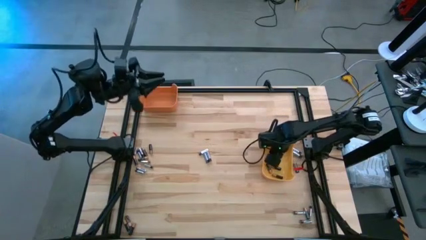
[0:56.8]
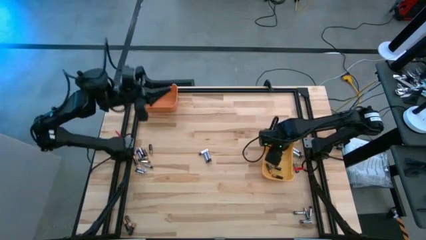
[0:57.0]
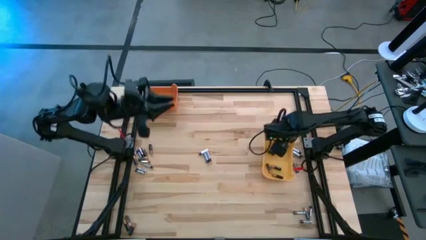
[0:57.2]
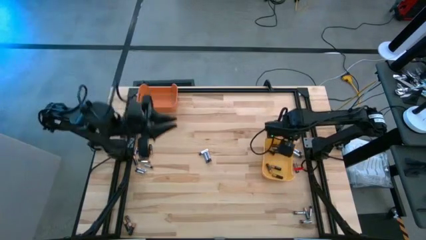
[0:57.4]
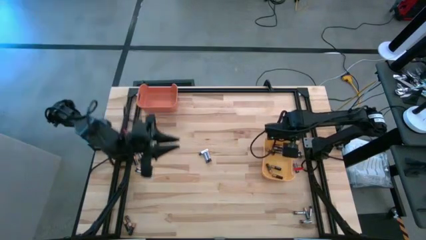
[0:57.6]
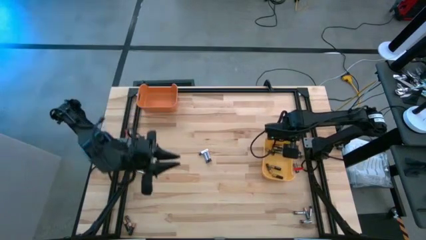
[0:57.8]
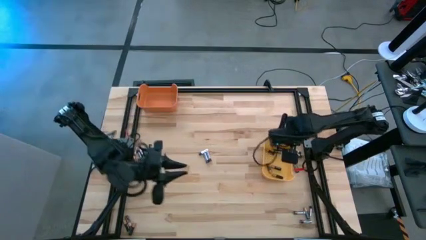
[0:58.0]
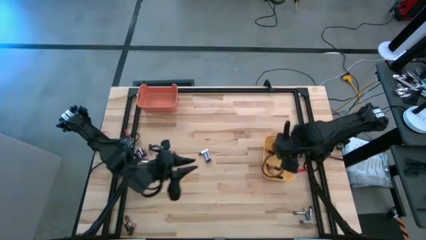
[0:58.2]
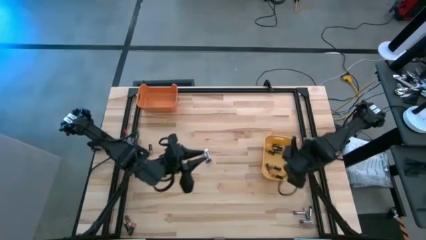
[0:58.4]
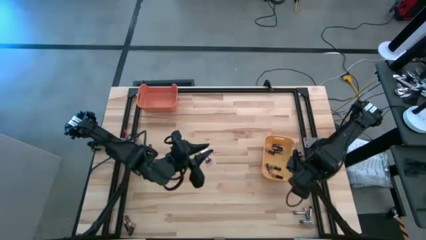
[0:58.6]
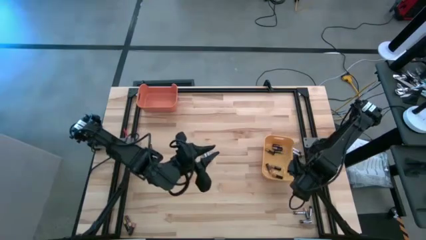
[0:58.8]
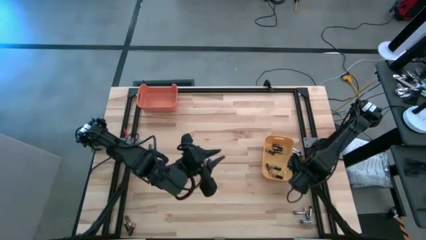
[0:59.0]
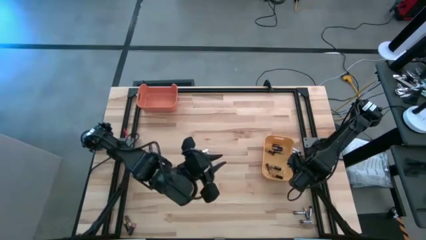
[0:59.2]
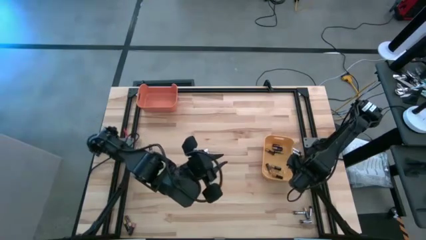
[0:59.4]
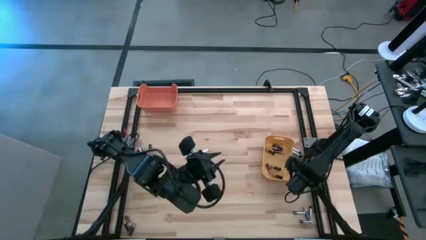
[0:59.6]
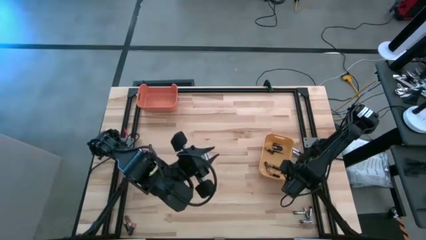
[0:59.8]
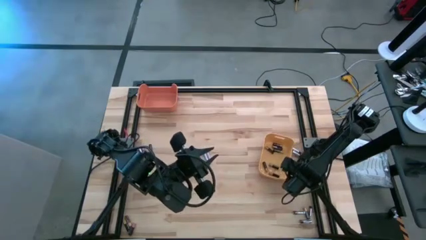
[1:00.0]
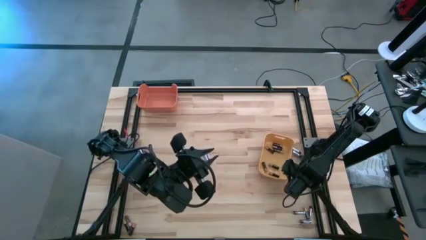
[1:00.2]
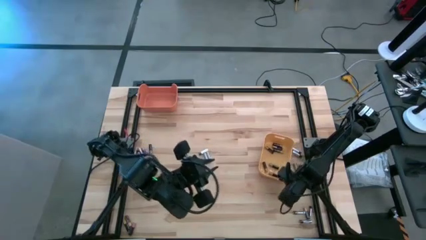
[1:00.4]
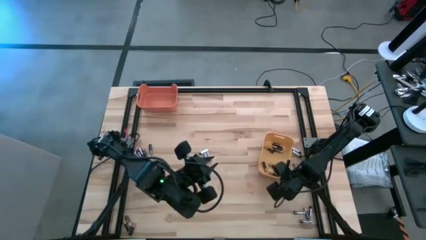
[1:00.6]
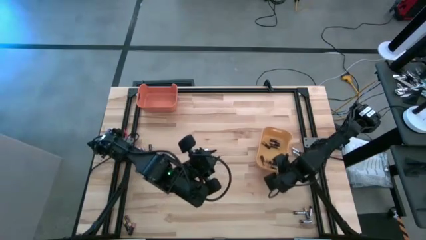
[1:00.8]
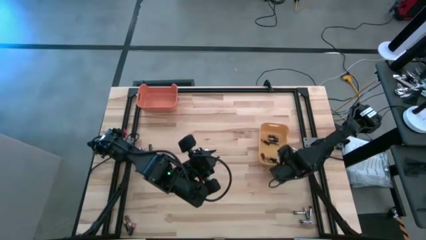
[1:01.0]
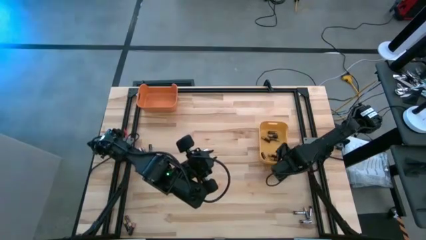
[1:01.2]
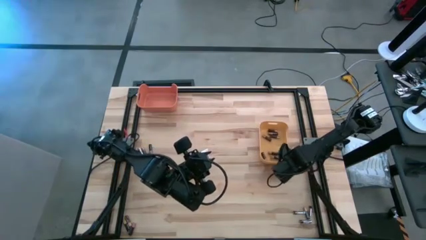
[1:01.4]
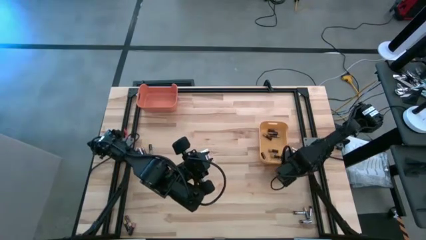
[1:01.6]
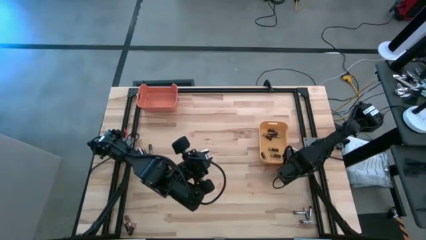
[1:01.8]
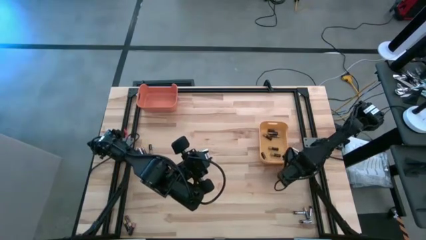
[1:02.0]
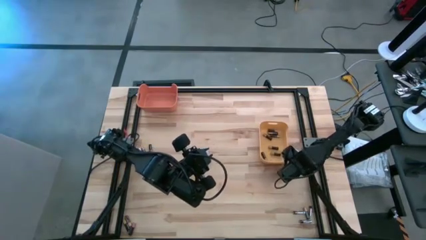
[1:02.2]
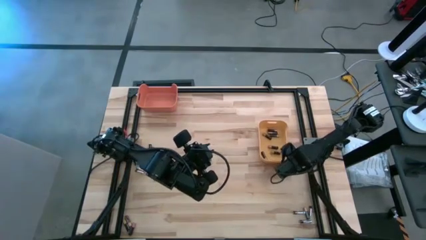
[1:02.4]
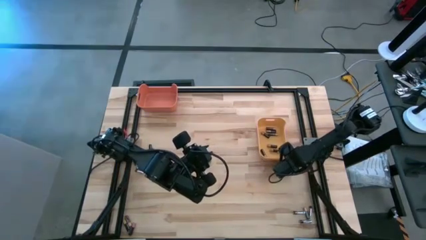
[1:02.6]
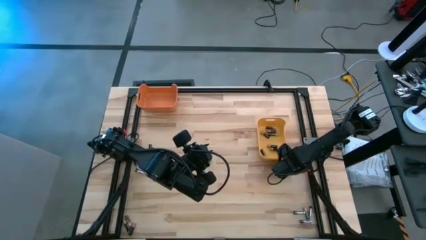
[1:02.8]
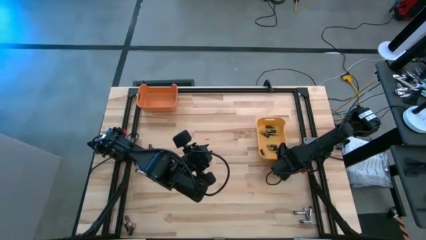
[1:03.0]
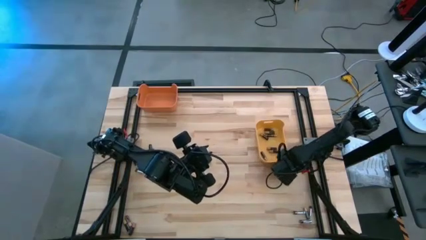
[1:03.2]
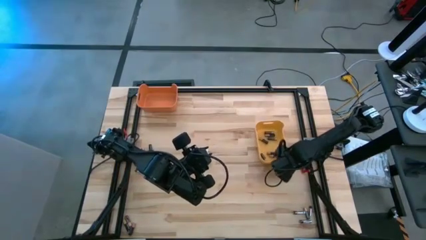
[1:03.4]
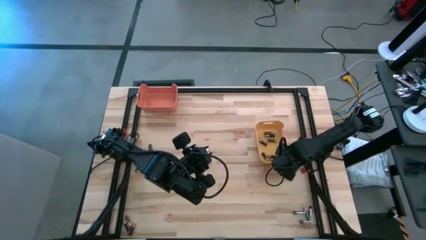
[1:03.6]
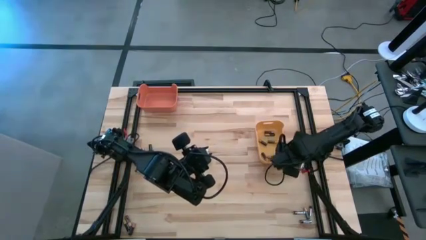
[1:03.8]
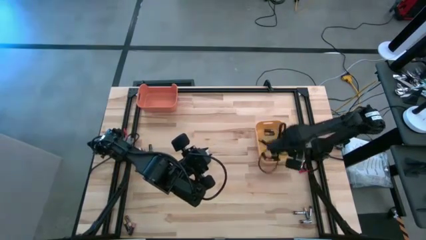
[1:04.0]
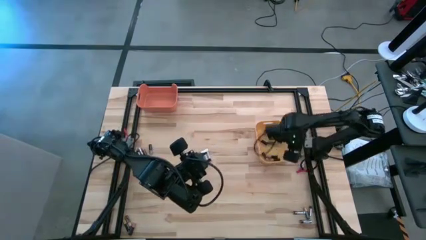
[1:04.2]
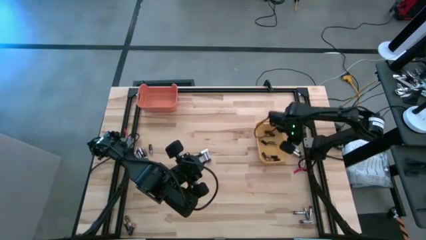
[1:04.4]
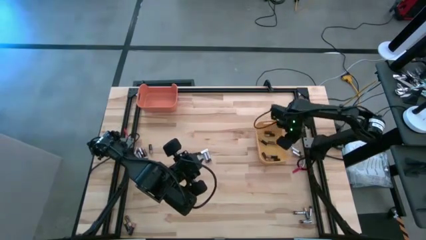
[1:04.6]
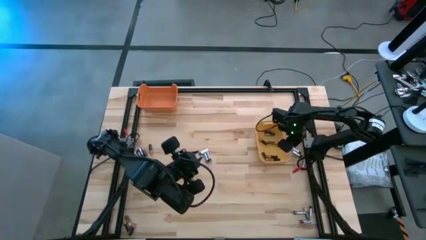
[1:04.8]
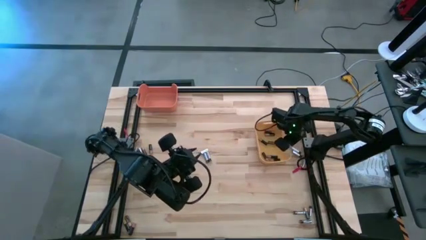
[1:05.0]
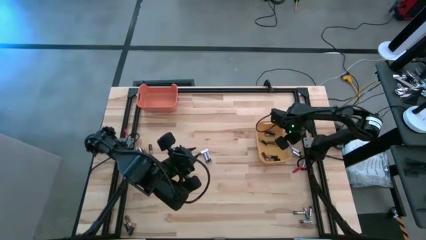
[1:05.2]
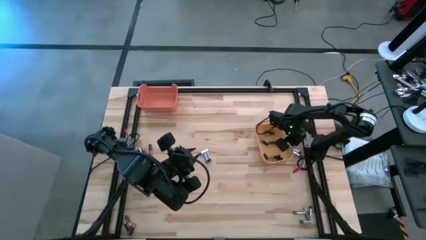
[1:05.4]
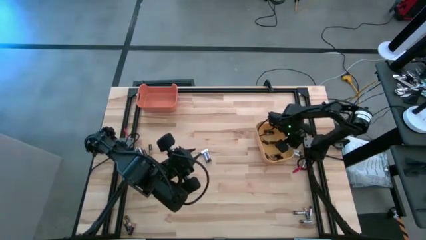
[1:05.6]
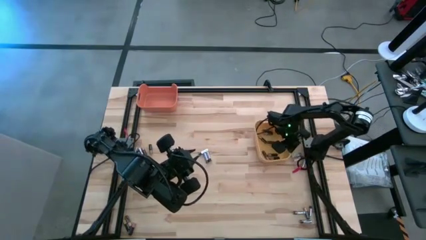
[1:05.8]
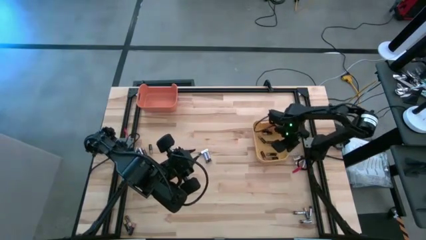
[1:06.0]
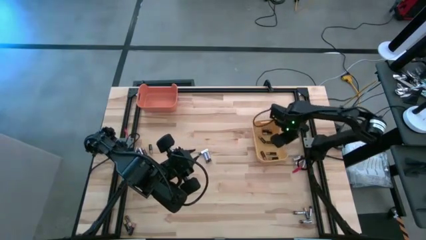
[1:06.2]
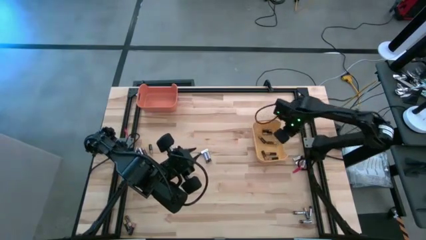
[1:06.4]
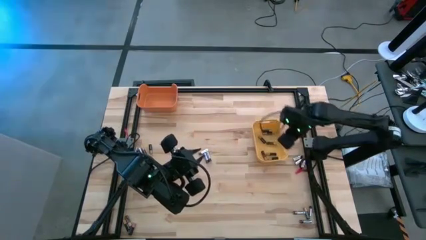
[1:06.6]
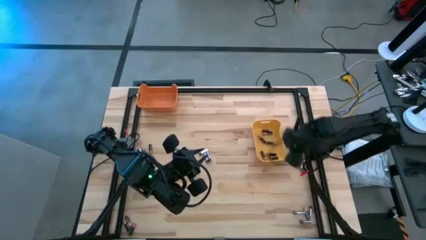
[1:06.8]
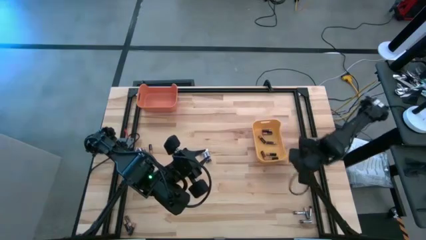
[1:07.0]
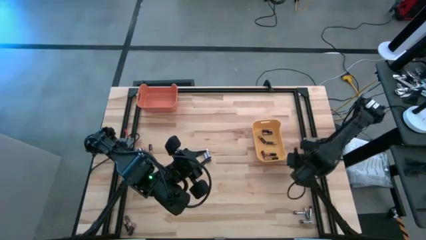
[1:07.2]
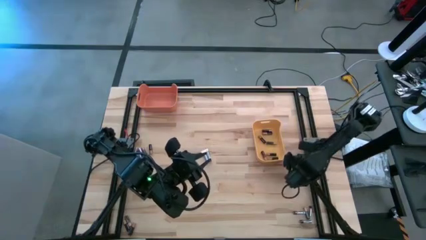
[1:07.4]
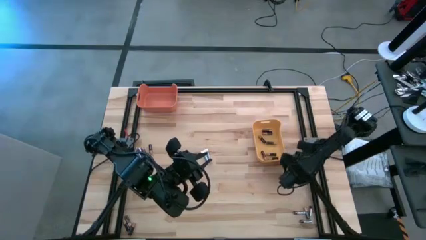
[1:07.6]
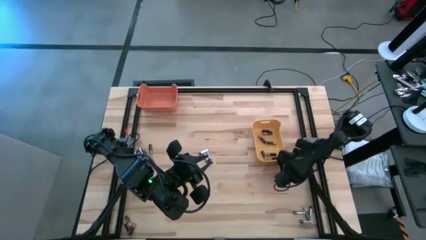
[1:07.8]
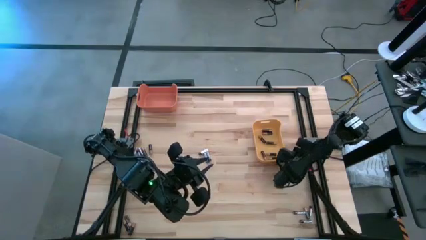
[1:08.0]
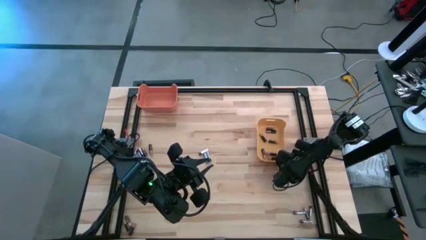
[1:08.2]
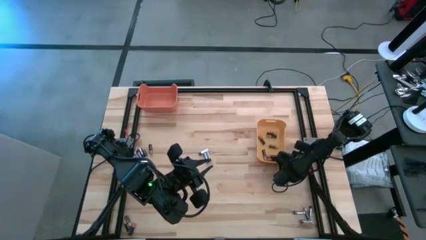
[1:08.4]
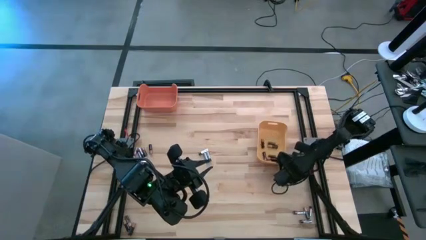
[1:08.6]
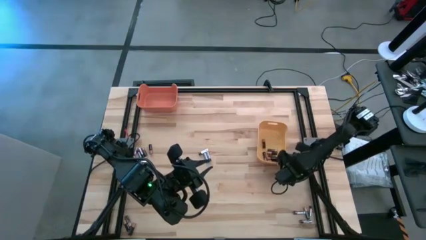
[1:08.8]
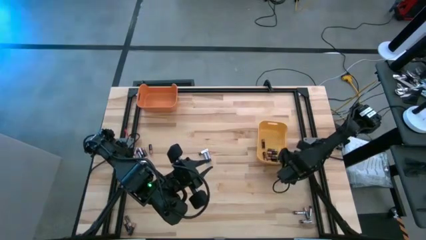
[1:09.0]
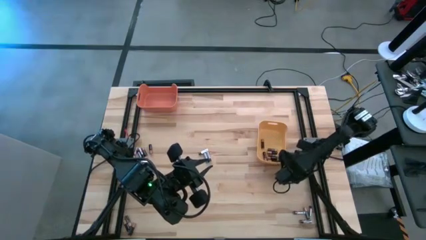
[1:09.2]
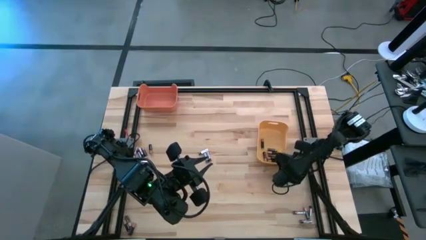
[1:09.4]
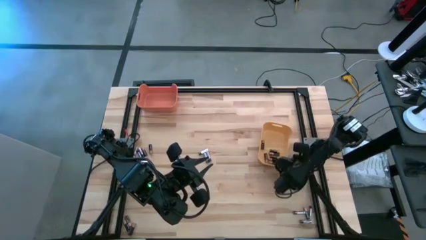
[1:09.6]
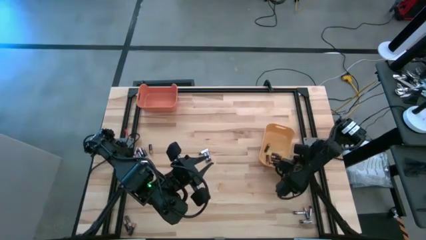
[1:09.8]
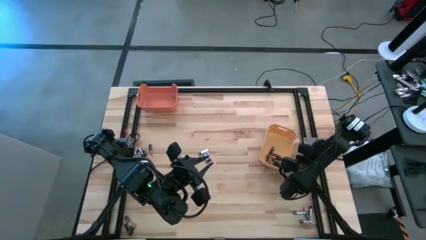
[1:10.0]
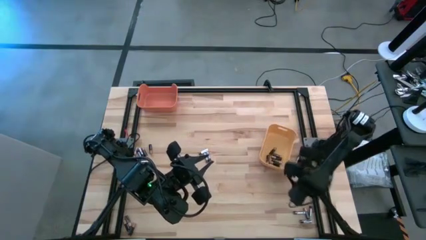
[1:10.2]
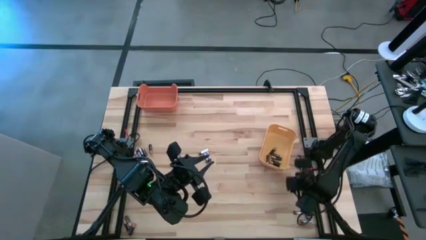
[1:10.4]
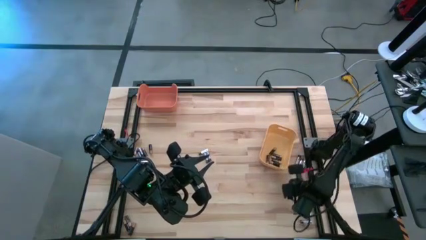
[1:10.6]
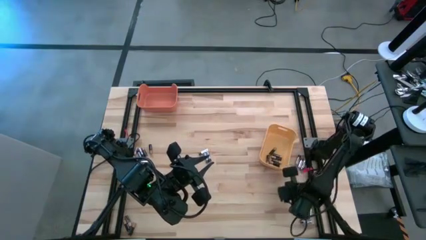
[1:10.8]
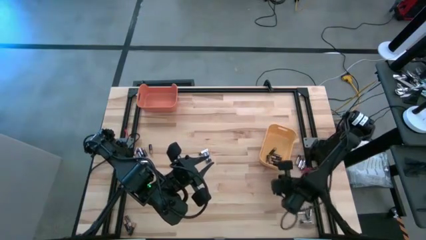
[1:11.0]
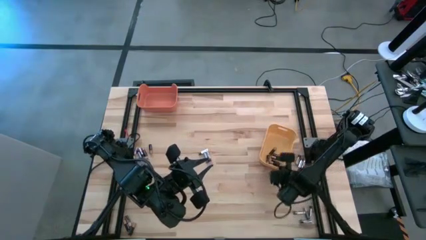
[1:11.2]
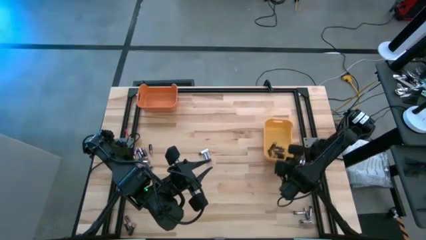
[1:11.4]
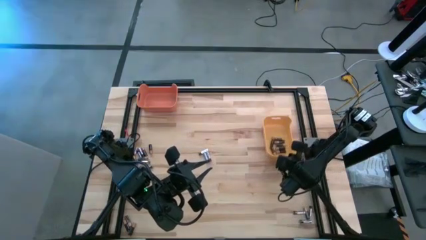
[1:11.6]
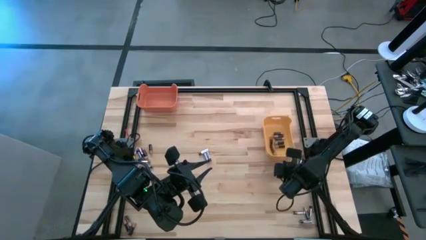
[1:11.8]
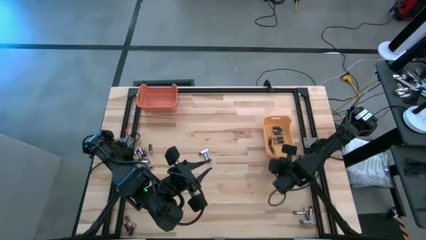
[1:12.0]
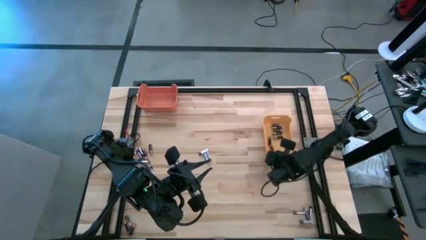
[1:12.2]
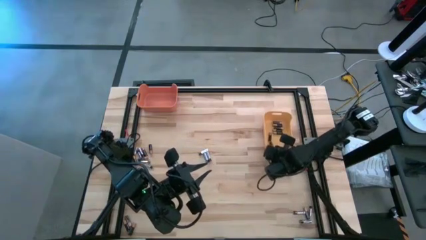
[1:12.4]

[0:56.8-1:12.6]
Task: Sort batteries
Adjust the yellow bin

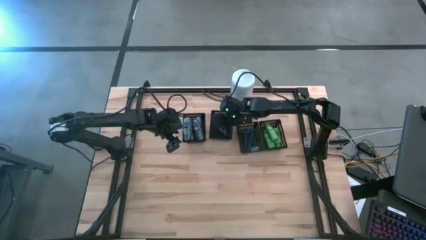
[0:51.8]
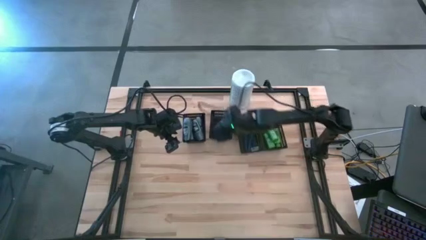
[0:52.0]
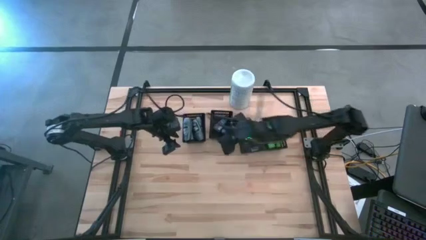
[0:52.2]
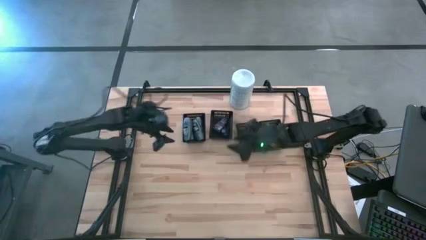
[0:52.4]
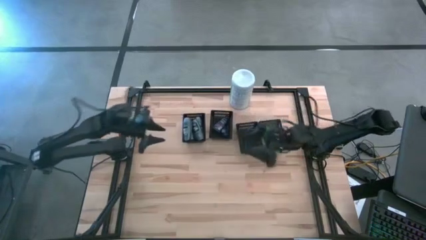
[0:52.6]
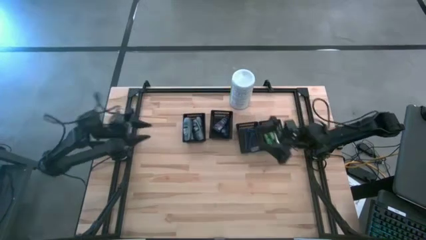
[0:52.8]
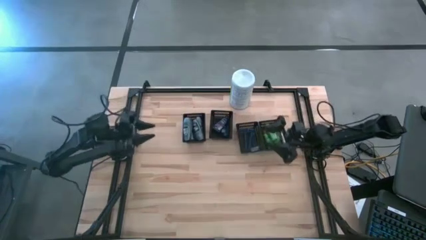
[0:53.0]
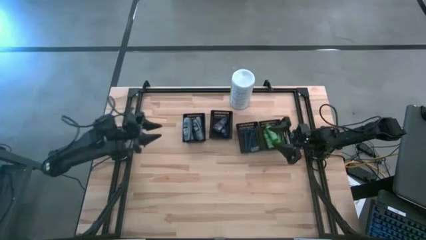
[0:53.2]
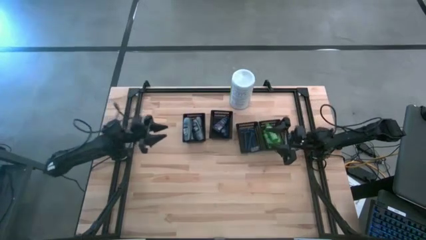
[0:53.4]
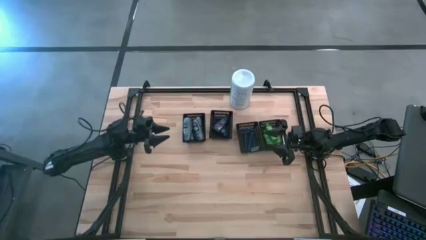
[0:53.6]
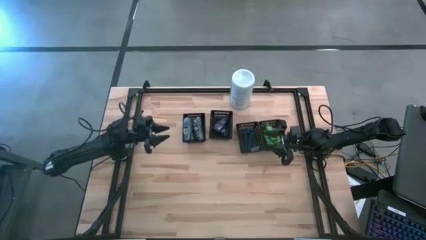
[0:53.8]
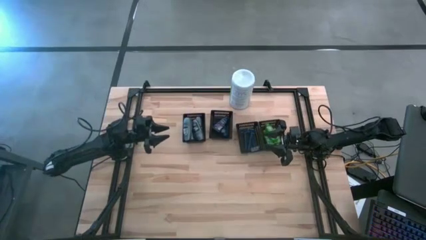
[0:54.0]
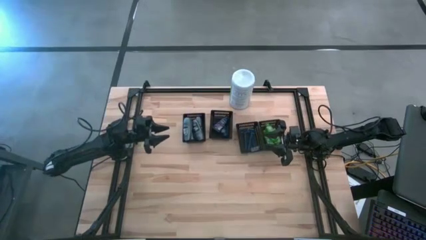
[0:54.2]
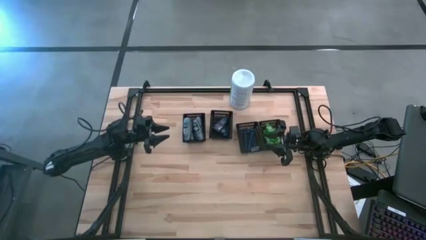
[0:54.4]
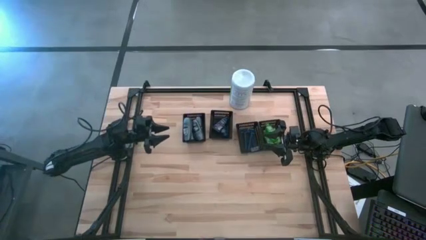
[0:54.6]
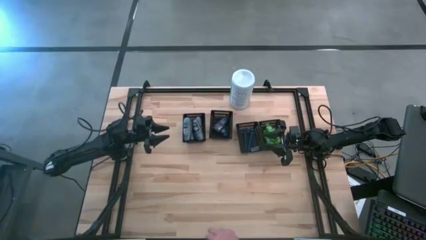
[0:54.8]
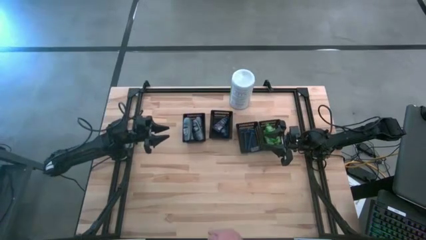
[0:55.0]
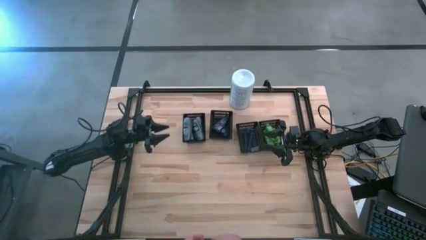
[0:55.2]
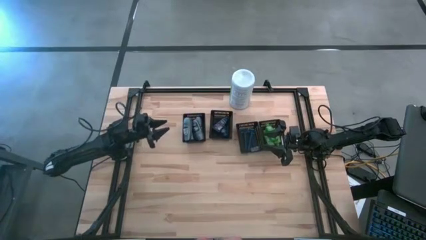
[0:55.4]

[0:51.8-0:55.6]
Task: Pick & Place Travel size toiletries
Return to Home Position
